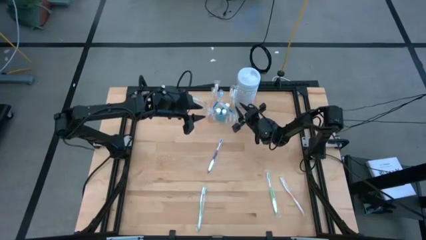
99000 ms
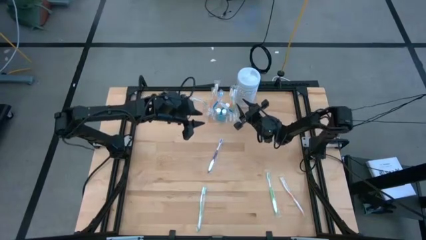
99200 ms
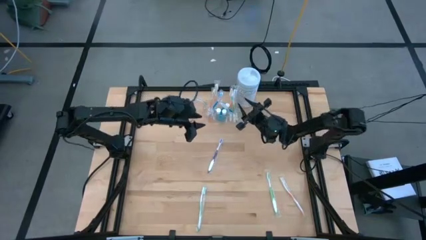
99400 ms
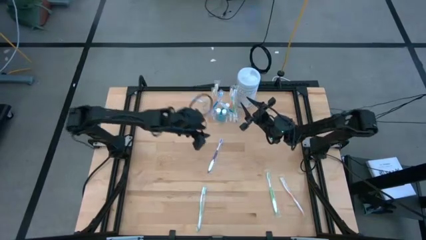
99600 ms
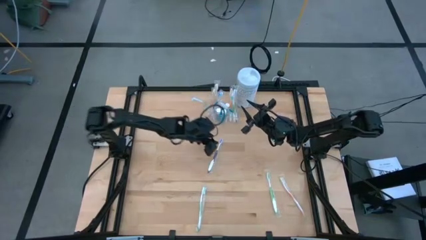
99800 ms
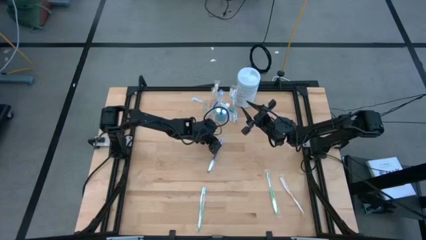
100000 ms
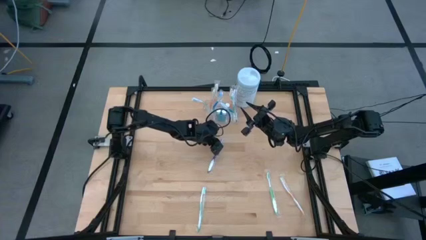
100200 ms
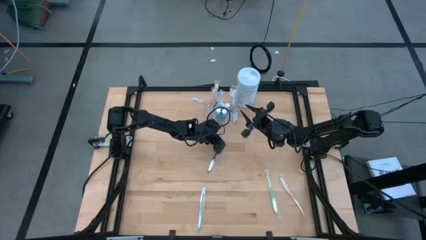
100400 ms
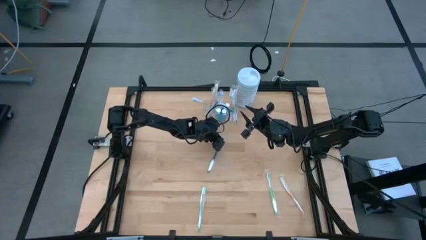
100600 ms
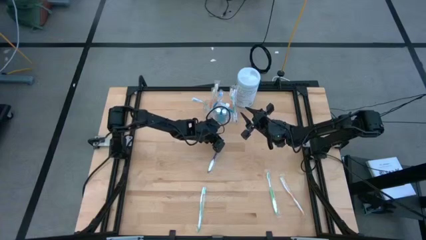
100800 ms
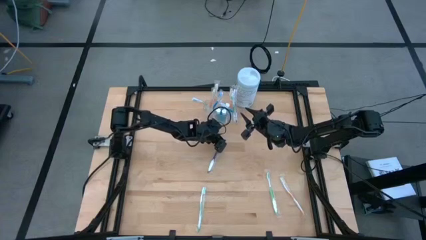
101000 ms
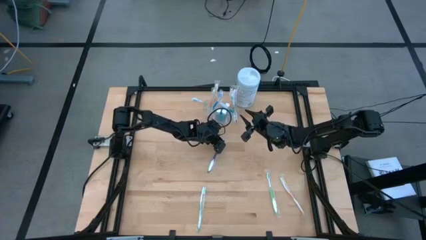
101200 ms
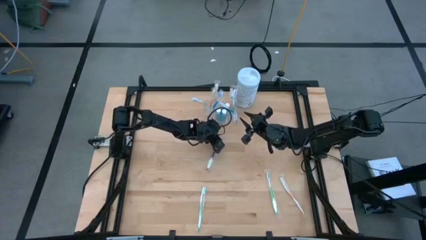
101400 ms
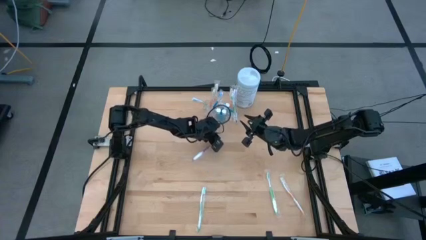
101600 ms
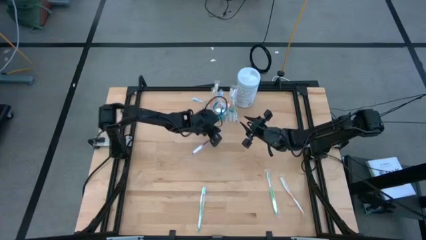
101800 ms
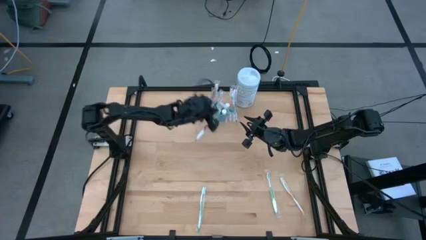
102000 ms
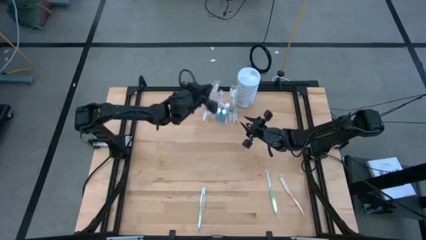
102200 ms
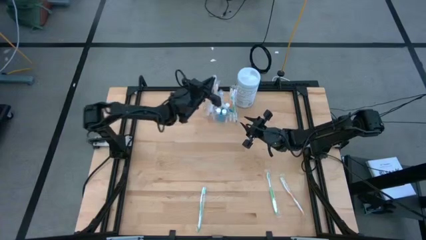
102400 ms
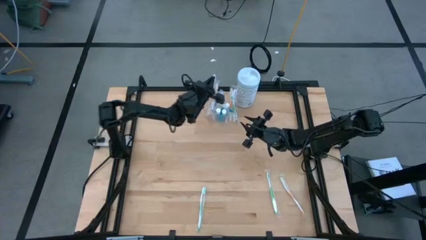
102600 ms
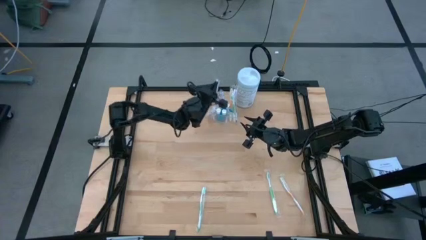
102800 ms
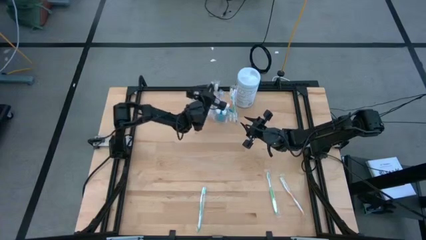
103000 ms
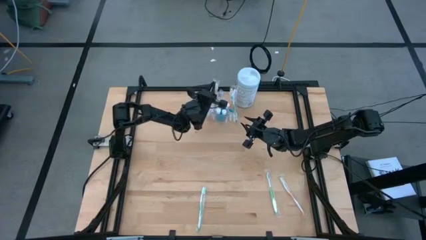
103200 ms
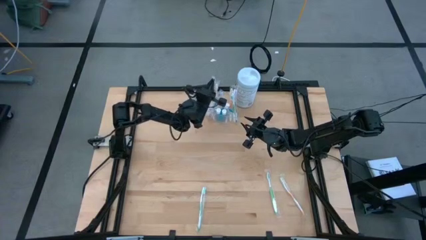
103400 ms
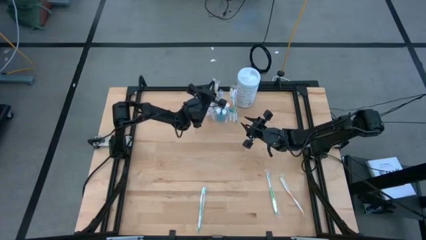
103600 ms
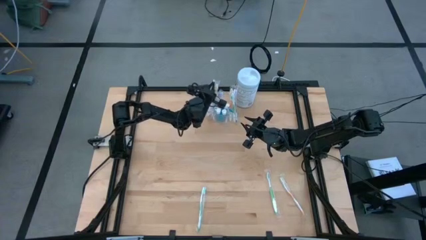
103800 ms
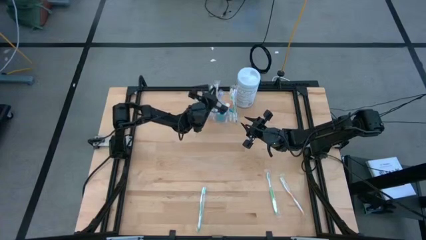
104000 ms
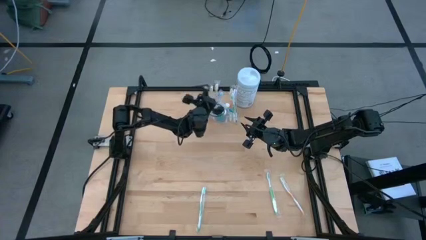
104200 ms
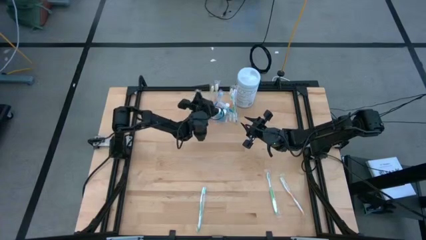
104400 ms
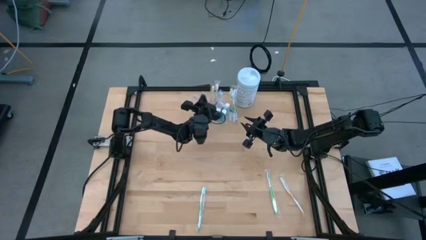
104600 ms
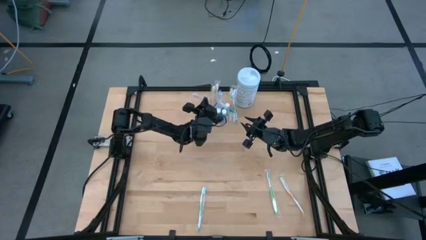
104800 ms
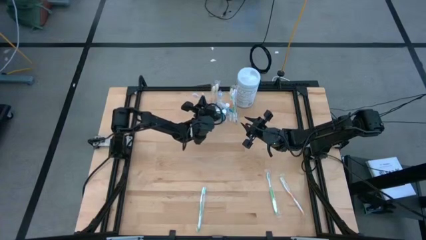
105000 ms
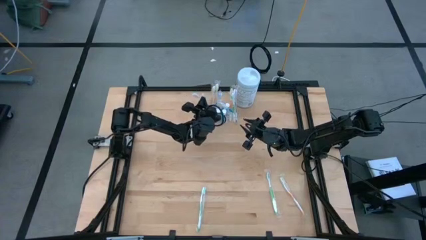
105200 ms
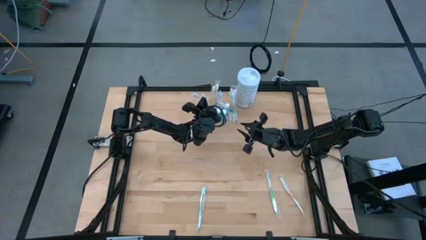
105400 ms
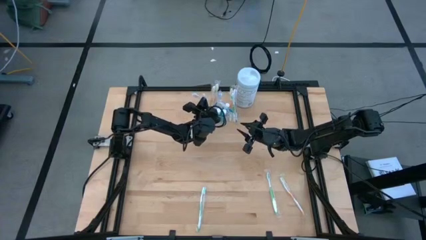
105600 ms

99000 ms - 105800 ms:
Task: Pick & Place toothbrushing station
Put the purple toothbrush into the transparent organizer

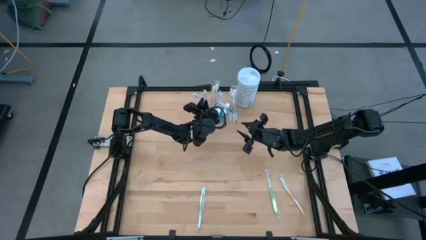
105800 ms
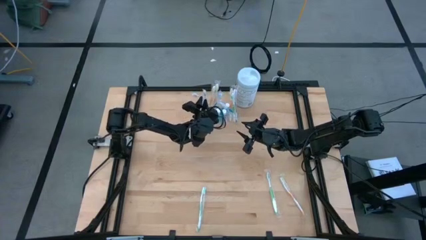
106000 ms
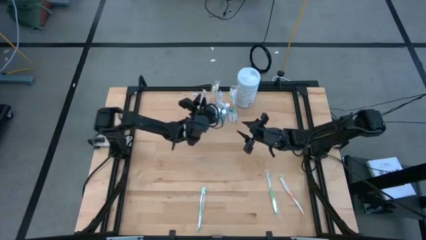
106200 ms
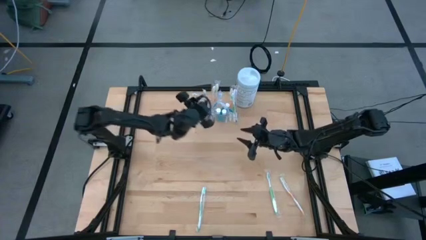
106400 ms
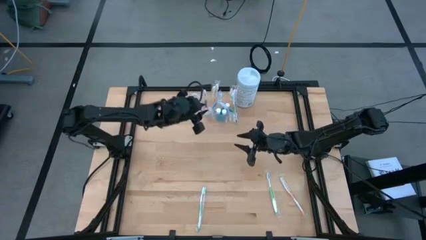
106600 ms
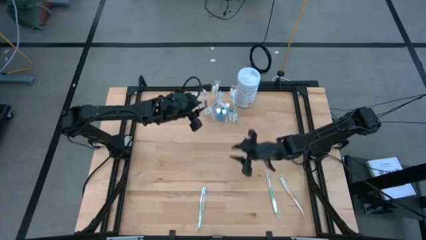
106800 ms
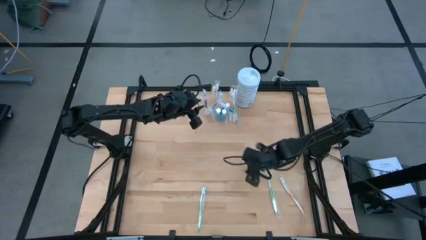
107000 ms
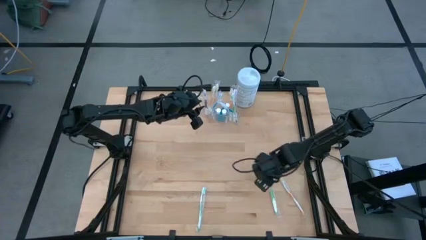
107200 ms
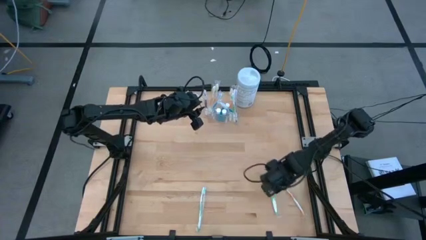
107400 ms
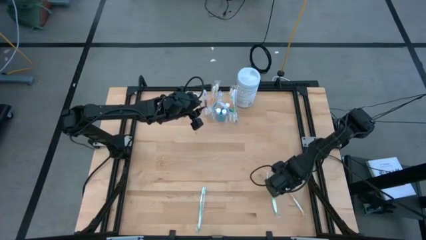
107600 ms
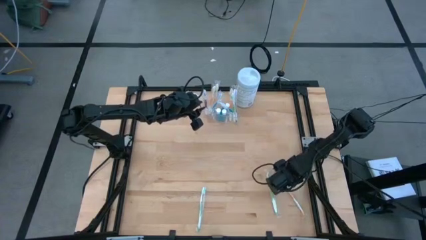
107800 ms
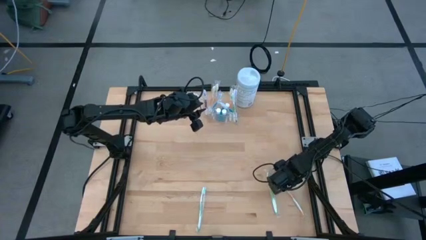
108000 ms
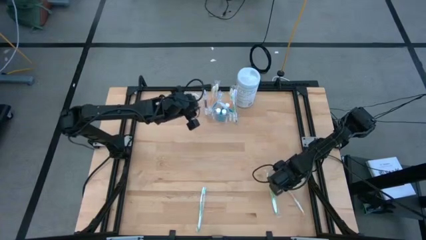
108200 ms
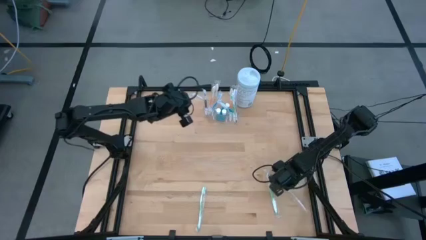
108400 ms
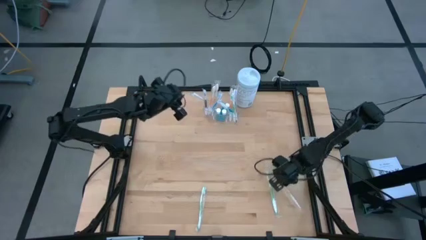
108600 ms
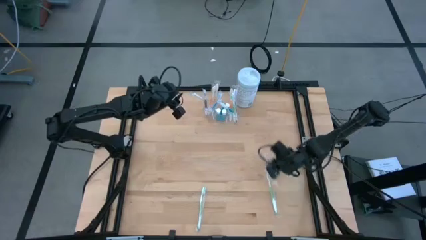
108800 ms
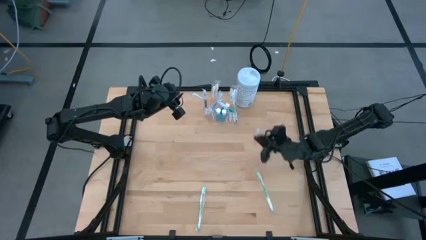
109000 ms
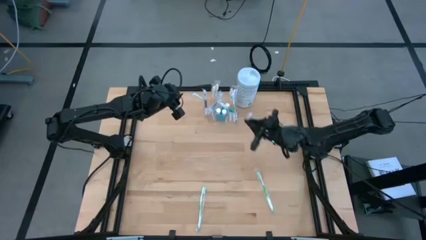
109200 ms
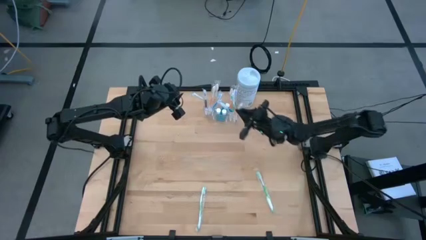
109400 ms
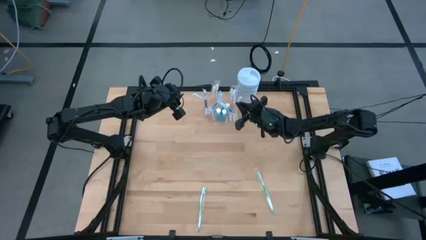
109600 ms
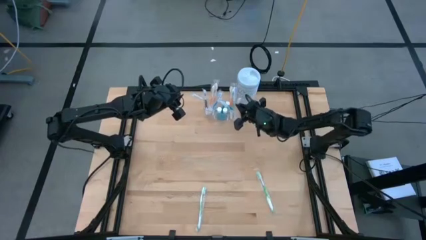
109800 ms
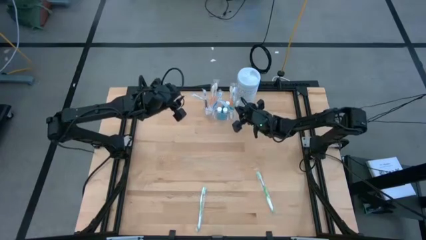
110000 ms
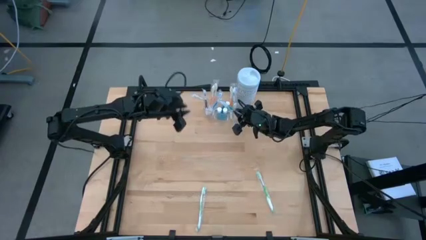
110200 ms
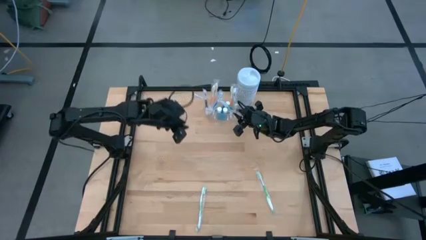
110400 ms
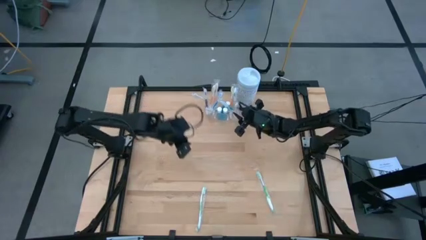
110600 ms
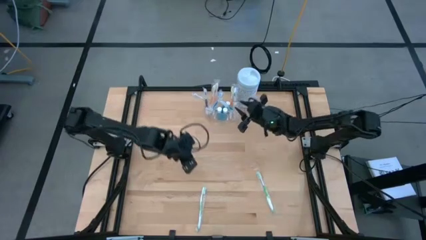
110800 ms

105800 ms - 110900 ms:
Put the orange toothbrush into the transparent organizer

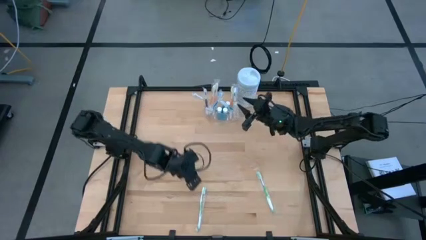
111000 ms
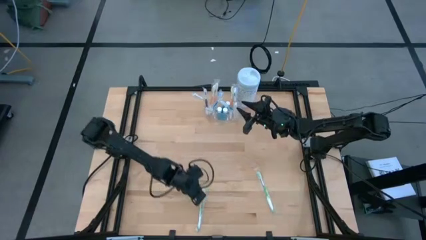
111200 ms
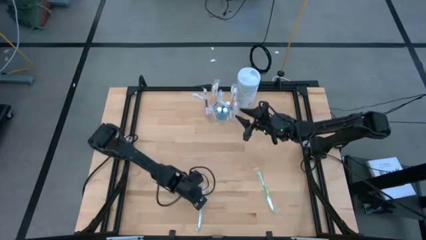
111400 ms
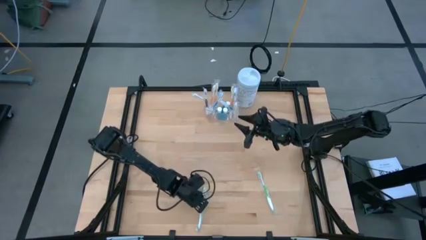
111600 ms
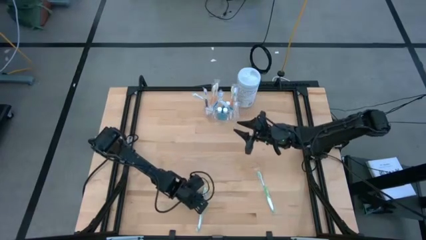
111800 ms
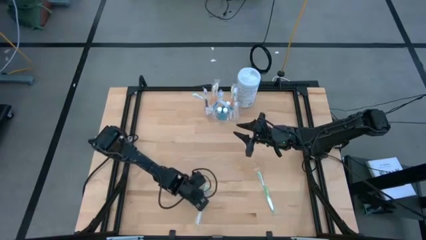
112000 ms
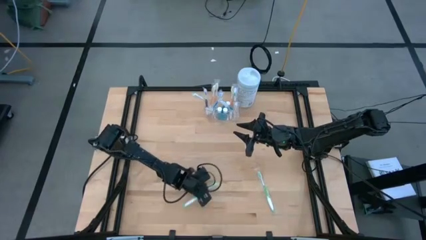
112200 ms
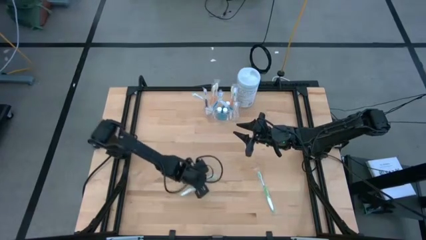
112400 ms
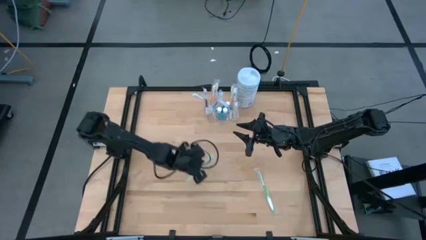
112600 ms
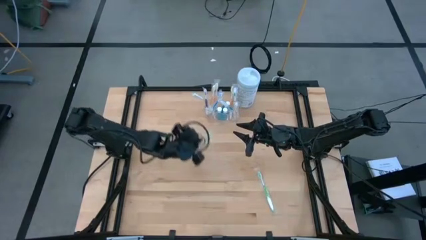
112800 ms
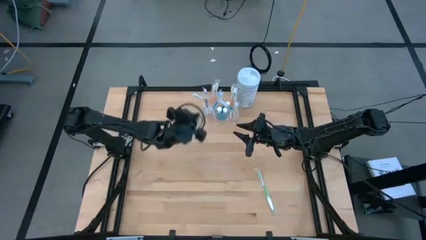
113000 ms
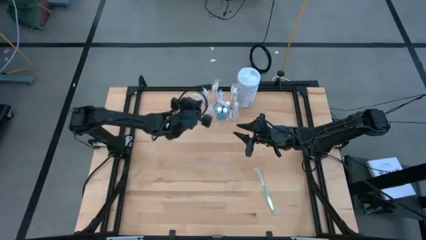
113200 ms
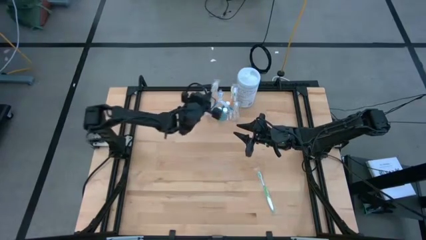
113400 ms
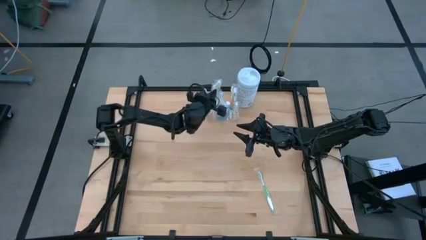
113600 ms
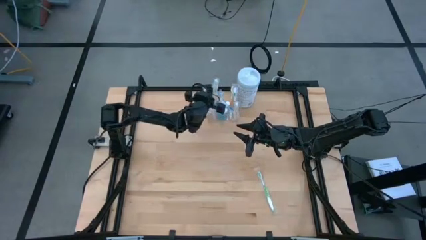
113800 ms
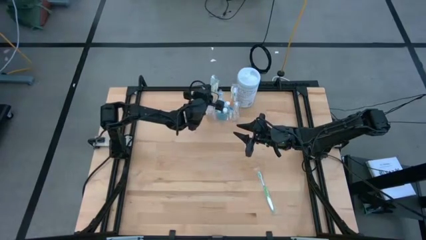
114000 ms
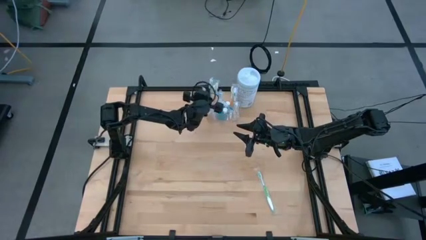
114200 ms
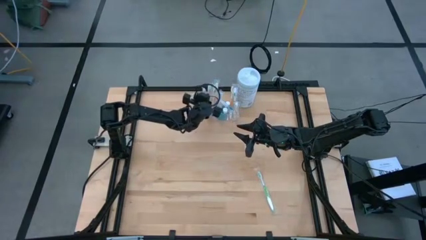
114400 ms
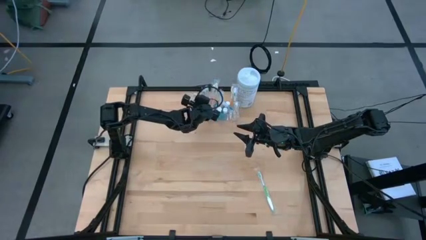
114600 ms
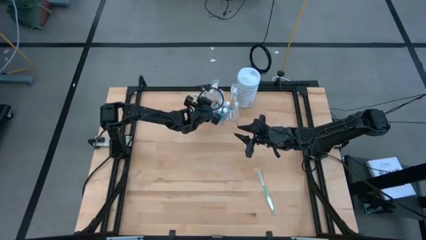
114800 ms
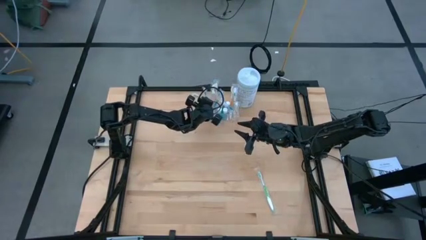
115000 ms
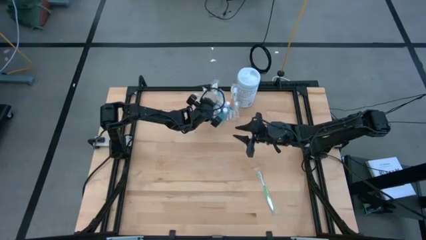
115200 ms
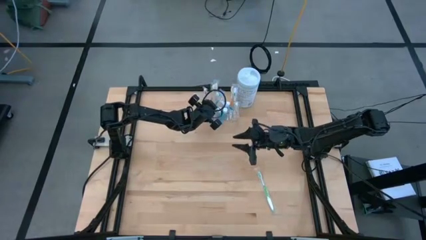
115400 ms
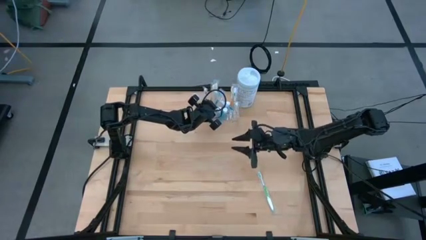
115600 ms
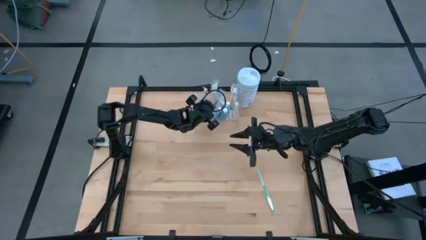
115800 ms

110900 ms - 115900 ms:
Put the green toothbrush into the transparent organizer
